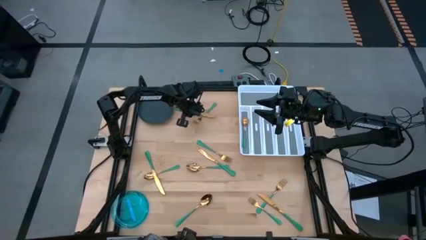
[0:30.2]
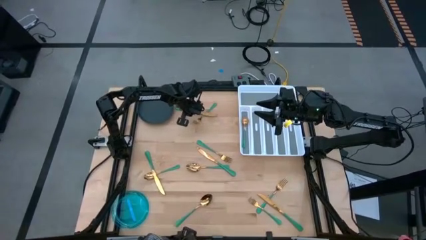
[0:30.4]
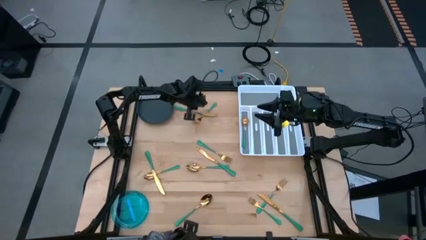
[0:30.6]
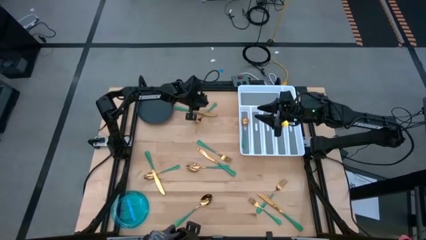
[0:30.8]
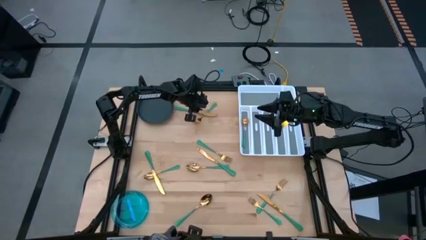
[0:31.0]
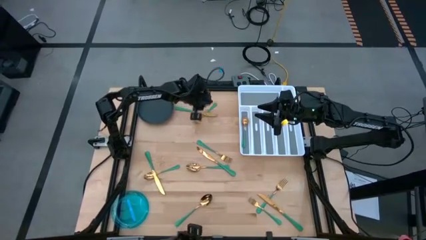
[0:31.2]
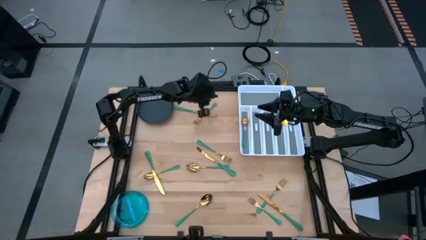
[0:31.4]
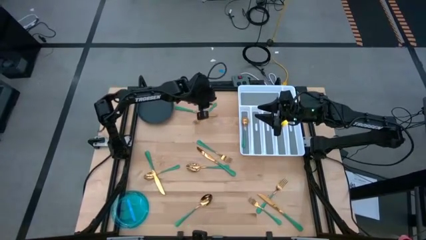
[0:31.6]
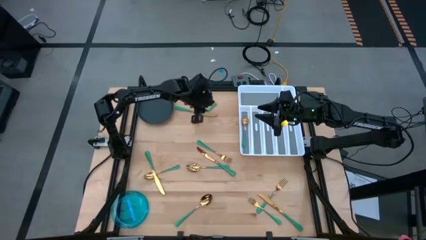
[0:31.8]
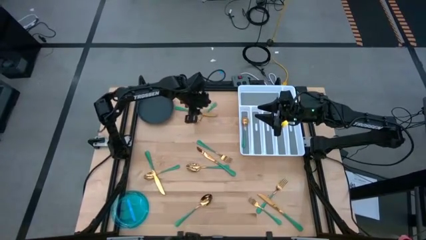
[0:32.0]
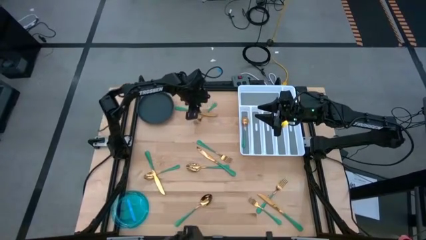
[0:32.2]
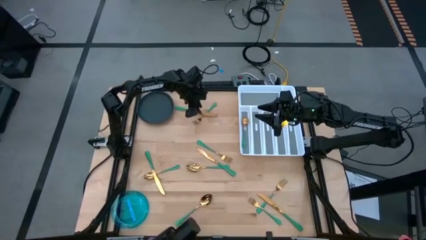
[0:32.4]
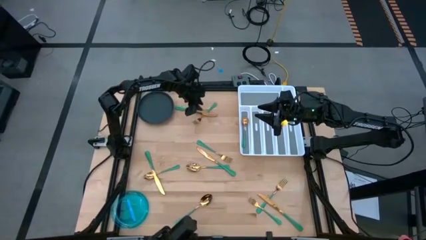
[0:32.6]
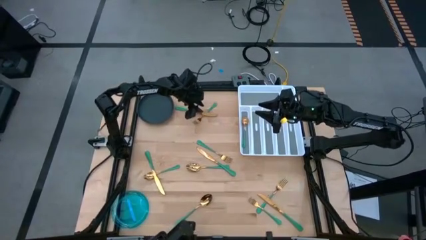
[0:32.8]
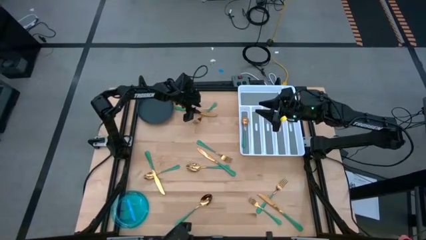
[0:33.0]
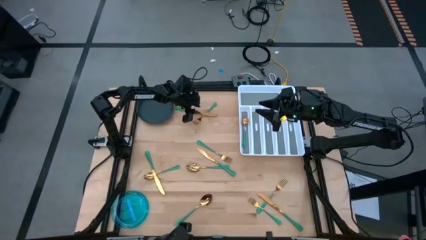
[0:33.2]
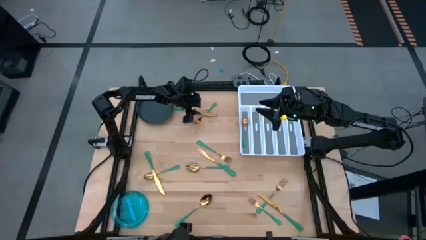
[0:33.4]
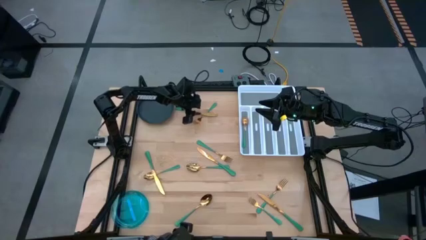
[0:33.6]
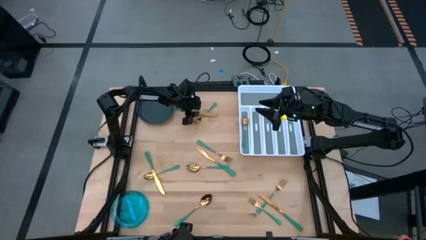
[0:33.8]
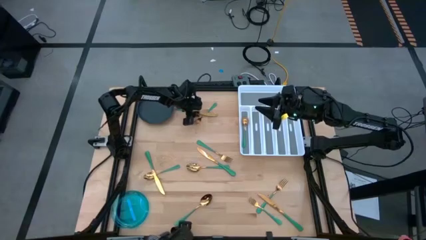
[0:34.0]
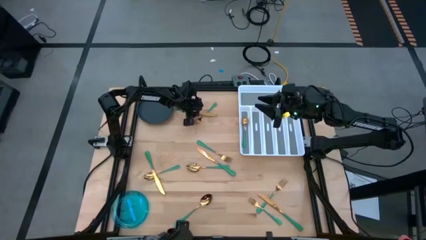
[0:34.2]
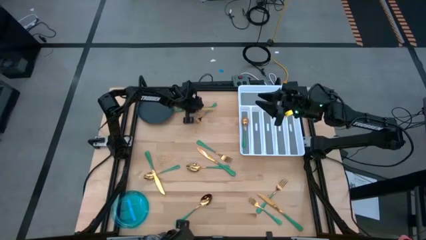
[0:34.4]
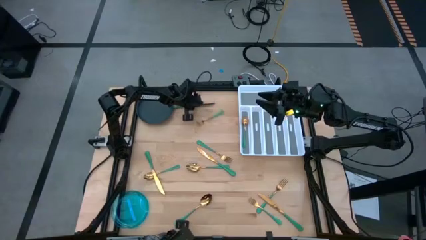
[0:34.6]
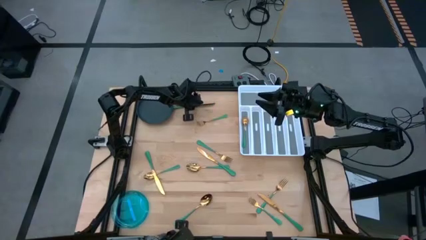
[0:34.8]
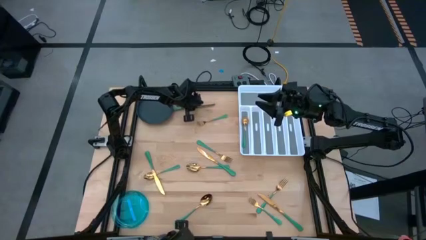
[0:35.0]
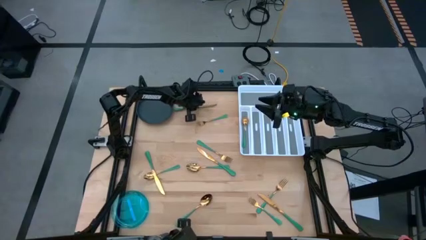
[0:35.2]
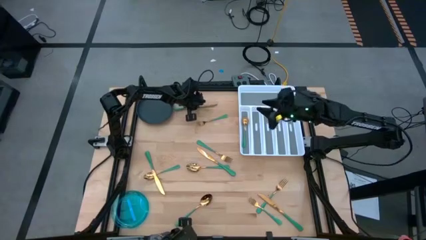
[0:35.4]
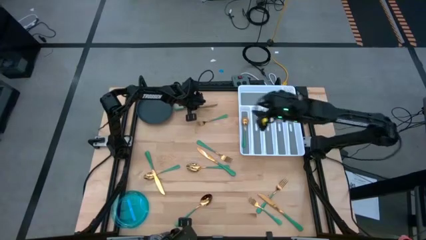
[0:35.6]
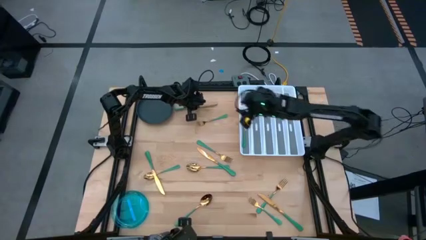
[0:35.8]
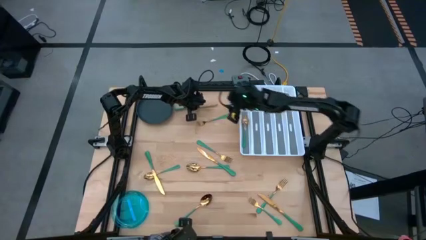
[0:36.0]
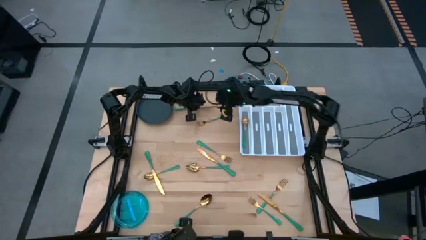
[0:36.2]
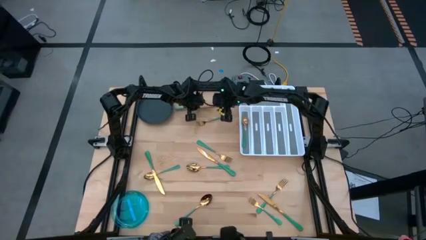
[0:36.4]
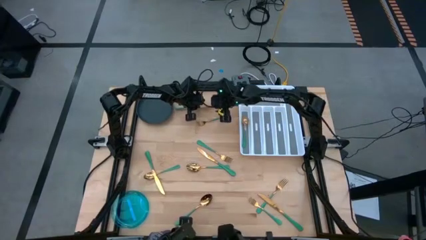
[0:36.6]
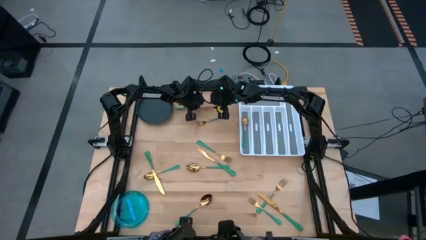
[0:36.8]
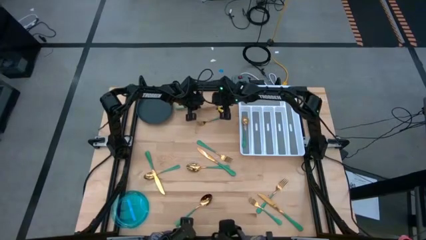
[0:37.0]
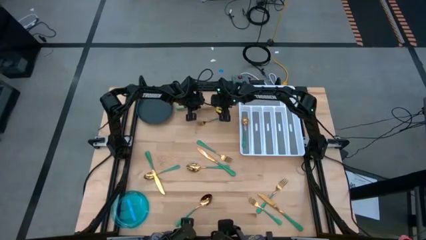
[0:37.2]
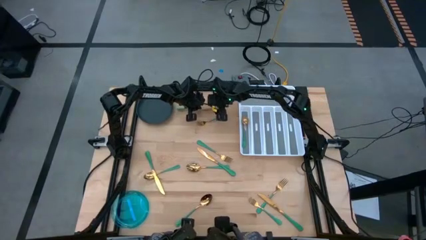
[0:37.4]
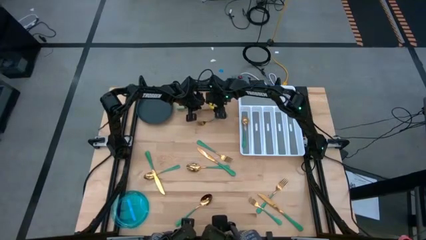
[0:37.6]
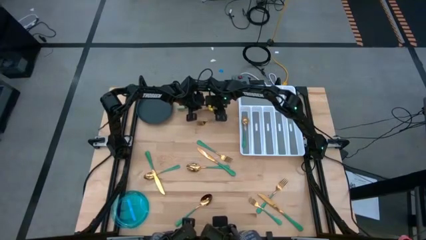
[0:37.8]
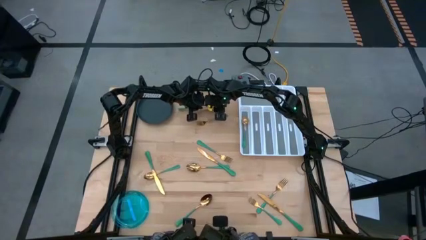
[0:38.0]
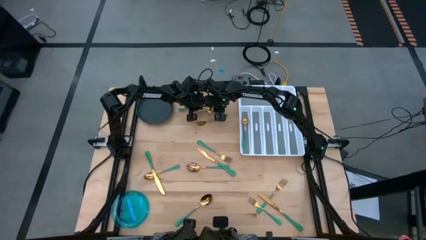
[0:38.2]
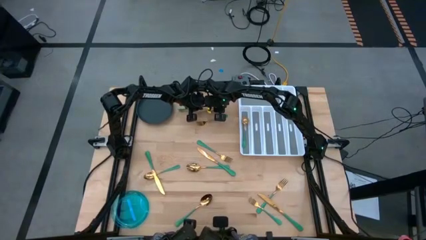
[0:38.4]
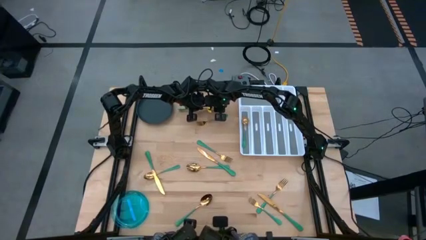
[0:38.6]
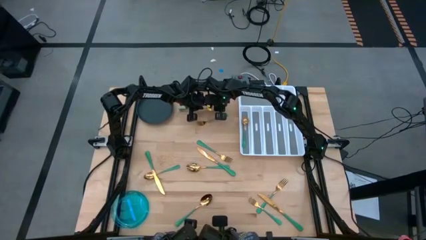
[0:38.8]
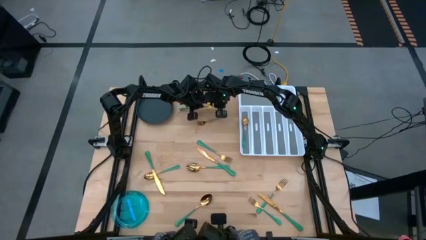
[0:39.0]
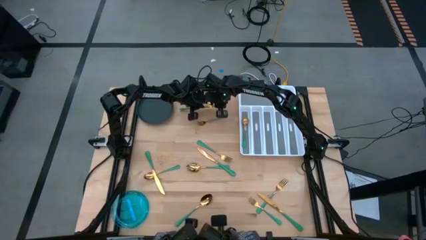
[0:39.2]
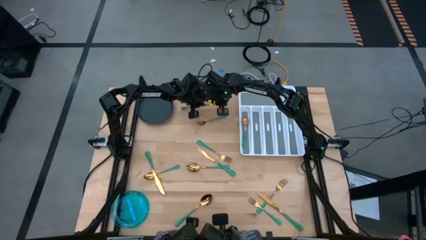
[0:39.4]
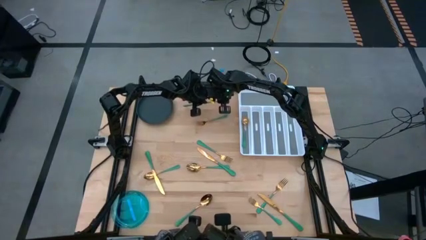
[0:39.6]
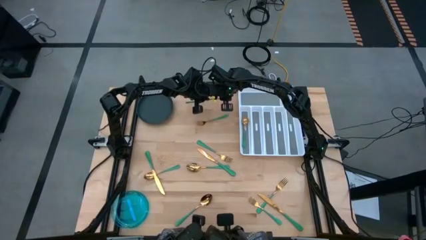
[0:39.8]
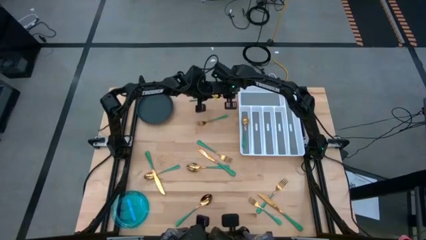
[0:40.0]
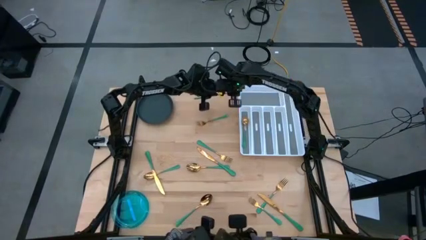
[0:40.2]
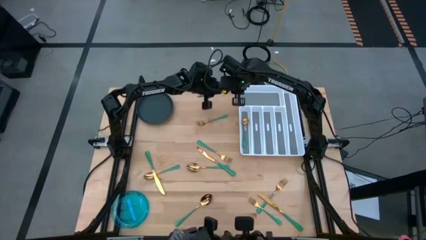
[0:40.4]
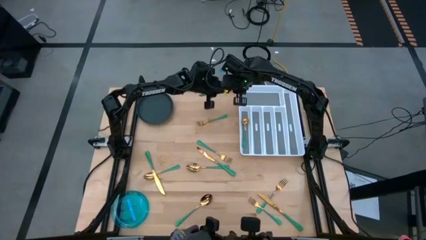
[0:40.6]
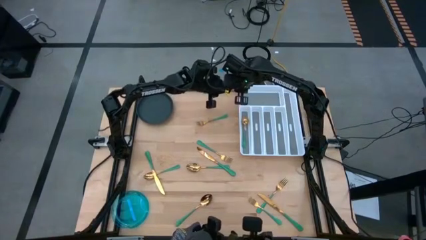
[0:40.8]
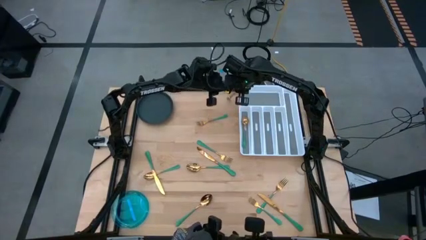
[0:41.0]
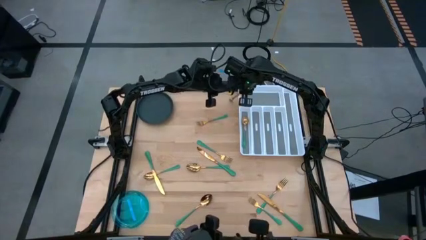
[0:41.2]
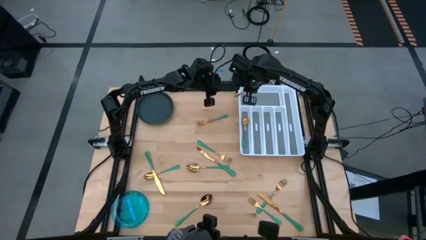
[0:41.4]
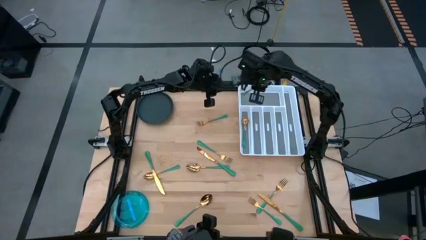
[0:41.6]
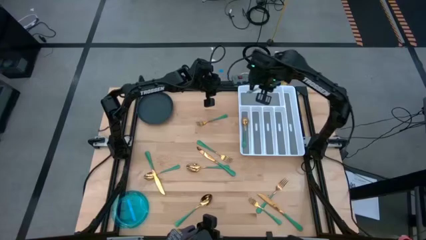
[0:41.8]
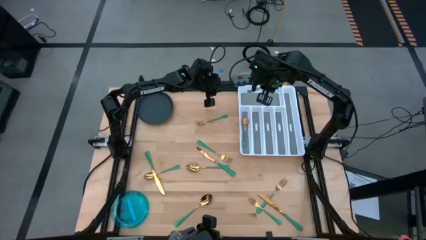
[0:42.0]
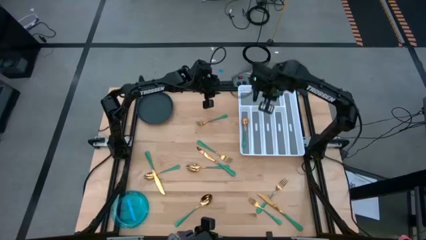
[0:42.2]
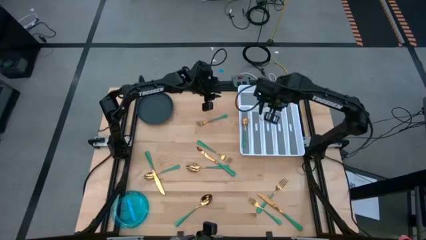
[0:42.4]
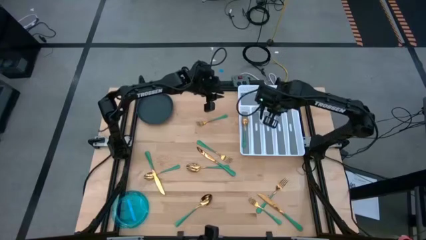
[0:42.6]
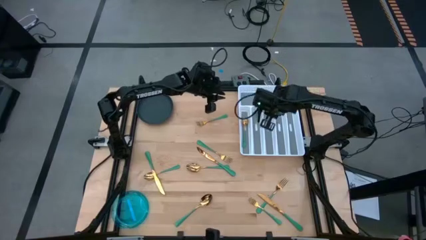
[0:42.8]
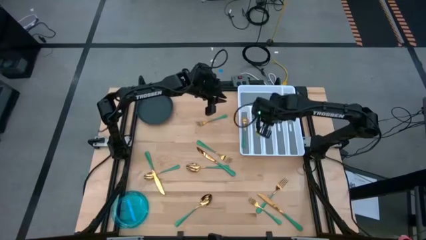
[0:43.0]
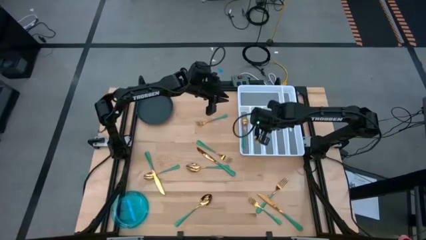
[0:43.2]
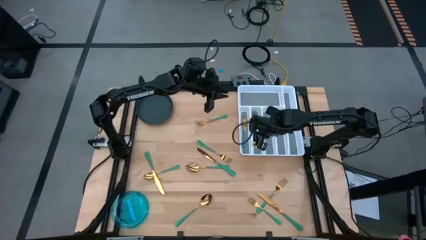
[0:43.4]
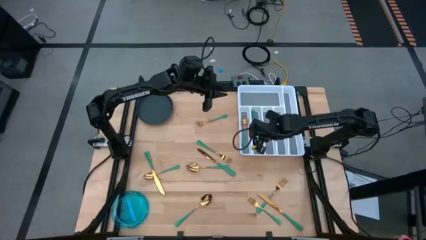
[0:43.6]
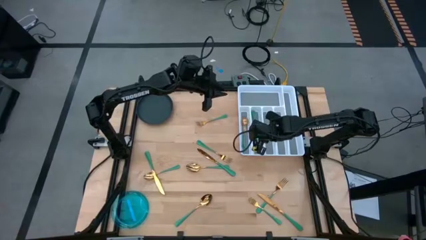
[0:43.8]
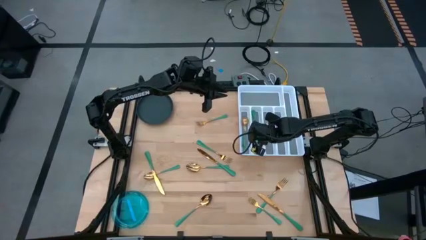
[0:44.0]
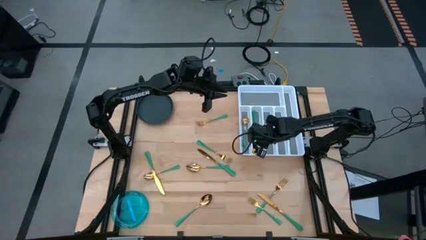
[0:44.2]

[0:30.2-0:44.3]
Task: Sort silverware
Put the green knife into the silverware tray
